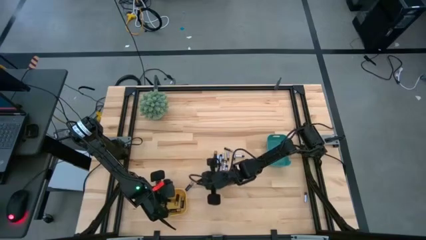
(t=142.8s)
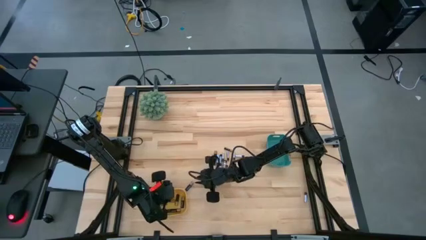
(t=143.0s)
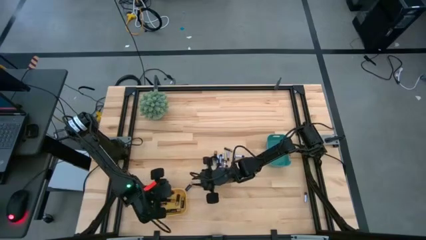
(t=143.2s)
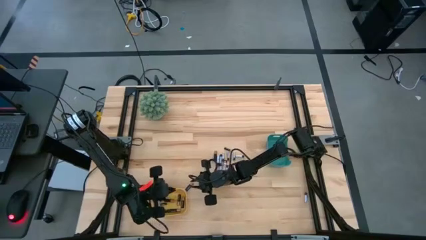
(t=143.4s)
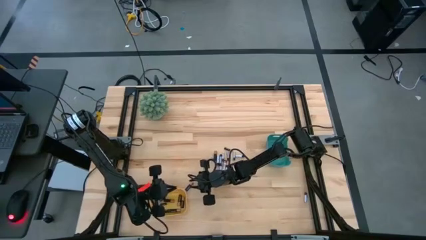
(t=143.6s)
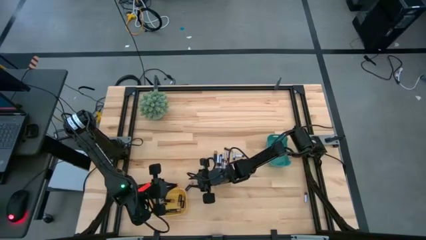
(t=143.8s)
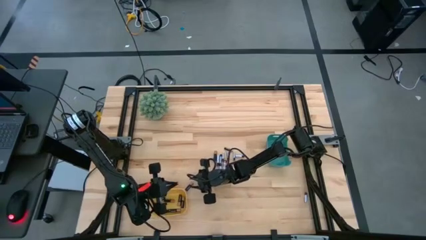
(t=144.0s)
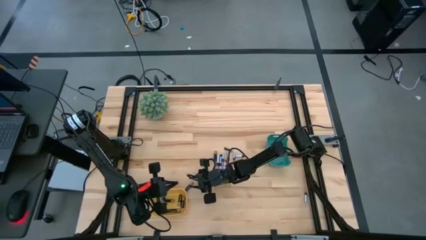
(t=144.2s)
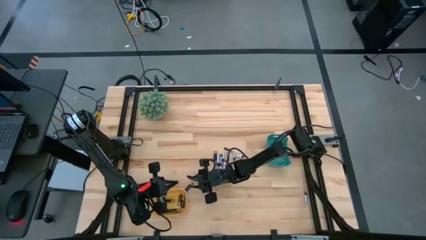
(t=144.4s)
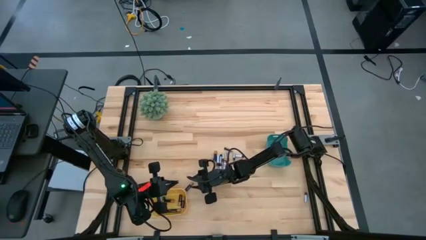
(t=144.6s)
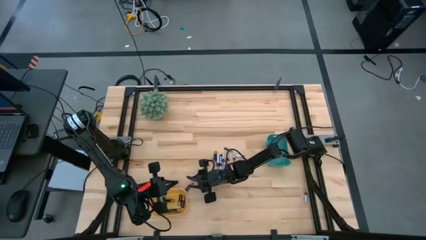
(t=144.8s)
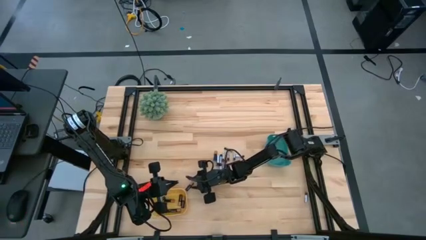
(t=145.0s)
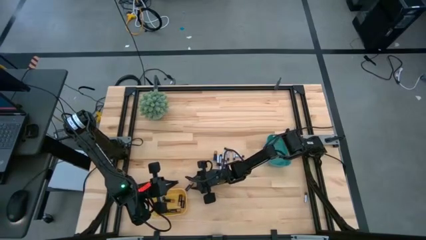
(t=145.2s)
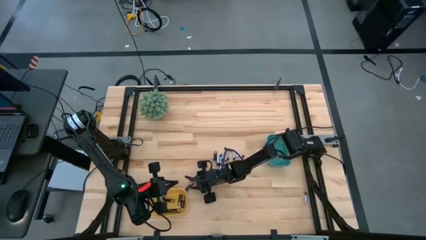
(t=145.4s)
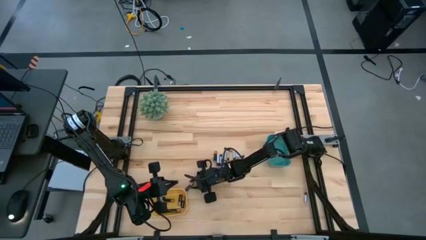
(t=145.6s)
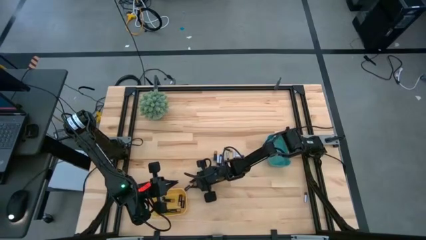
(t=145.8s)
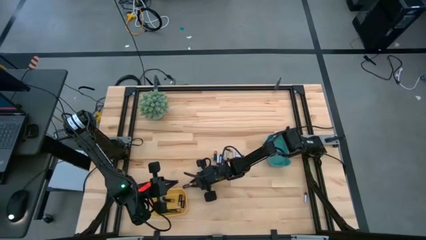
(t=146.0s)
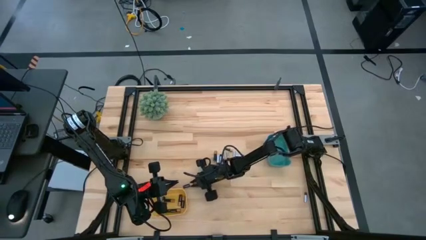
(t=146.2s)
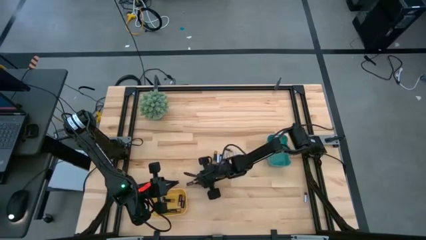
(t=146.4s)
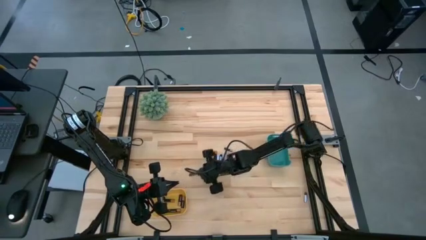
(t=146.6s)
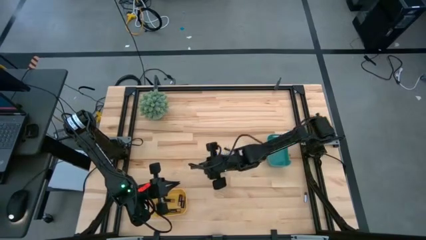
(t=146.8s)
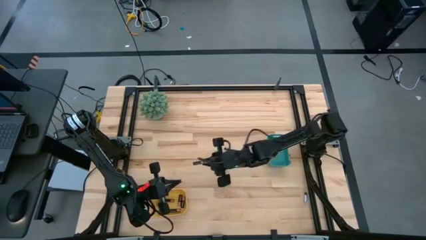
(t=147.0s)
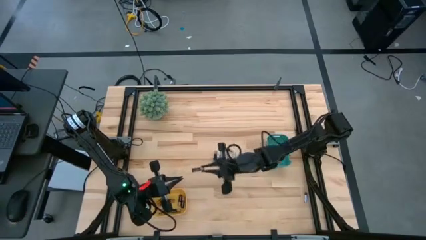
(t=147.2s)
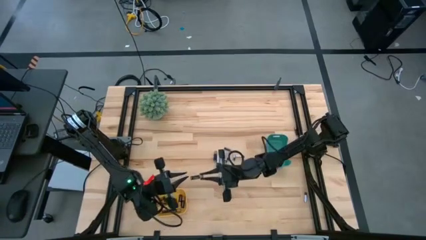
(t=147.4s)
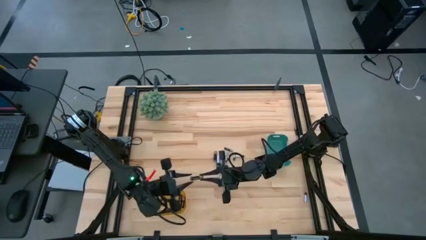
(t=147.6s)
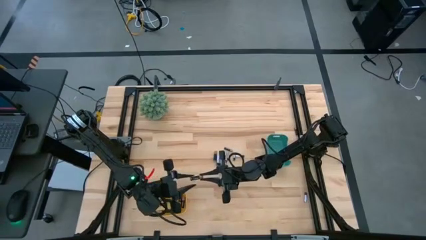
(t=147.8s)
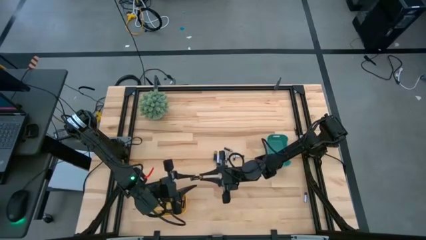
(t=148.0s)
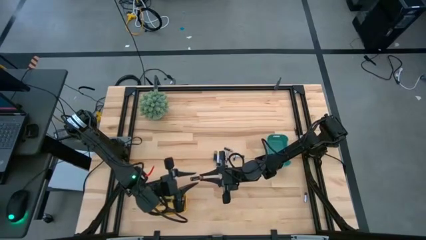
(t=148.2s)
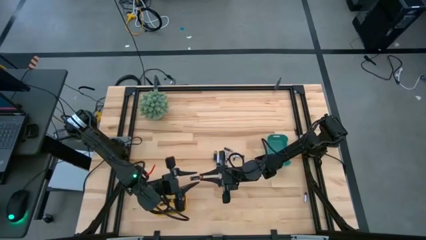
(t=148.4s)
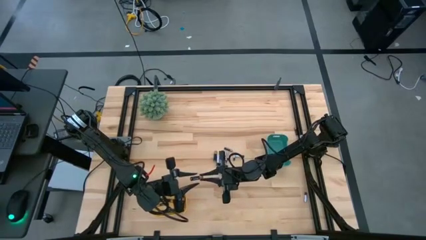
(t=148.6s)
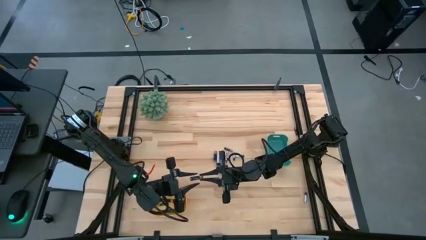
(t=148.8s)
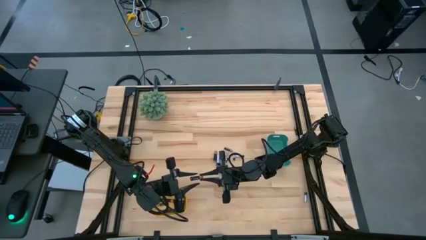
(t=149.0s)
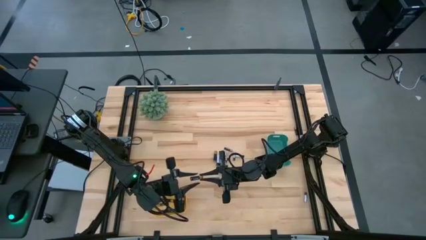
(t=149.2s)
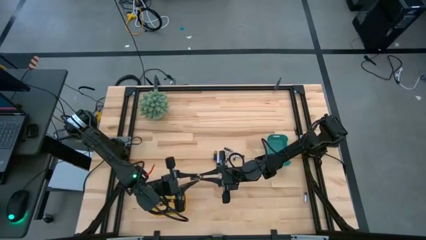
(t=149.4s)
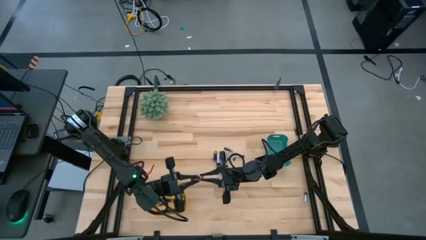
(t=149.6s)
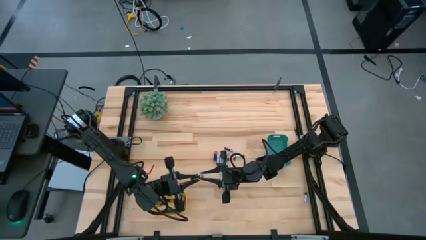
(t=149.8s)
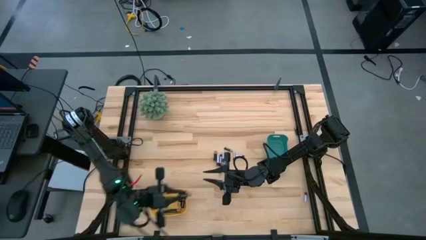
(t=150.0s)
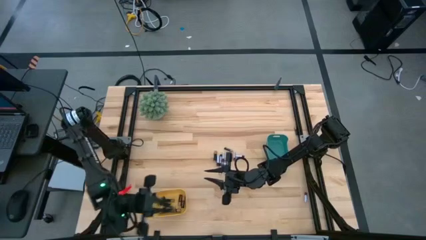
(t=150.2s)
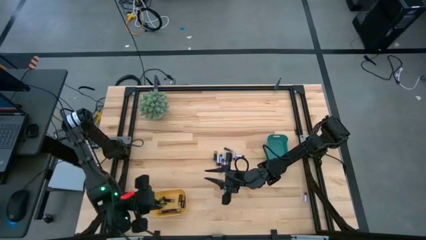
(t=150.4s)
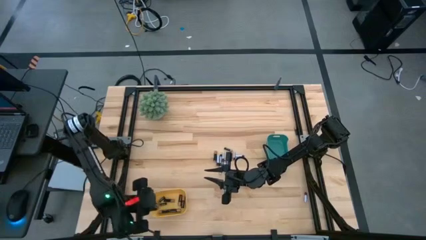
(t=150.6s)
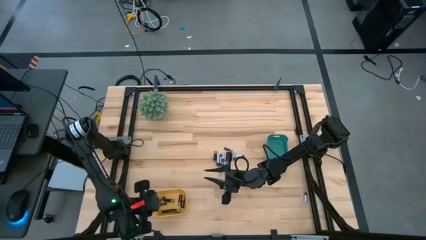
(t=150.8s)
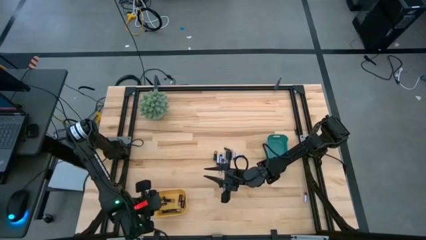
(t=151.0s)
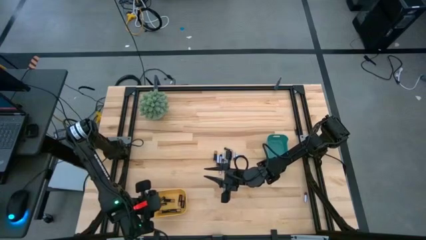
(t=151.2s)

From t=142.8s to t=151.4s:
Task: Sort batteries
Put the black battery into the yellow bin

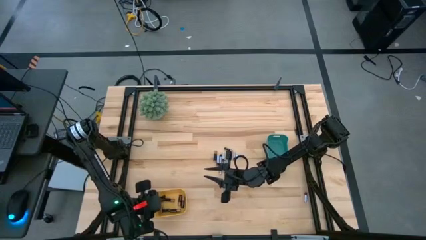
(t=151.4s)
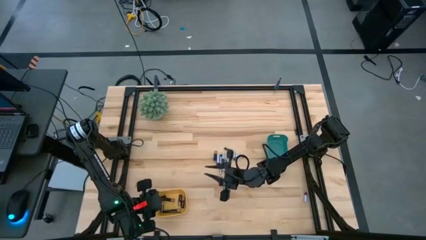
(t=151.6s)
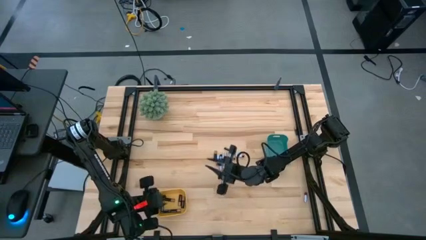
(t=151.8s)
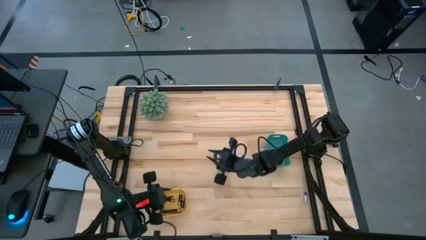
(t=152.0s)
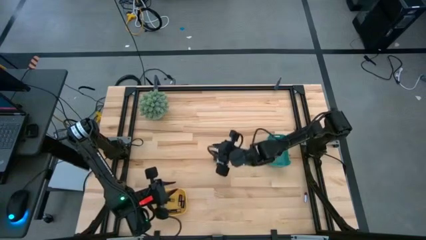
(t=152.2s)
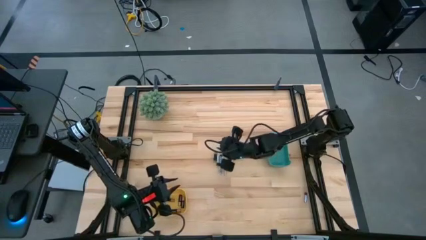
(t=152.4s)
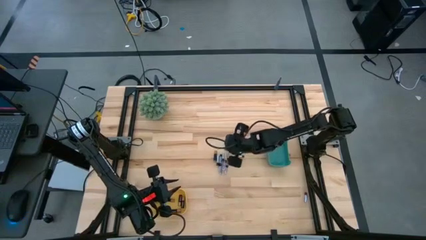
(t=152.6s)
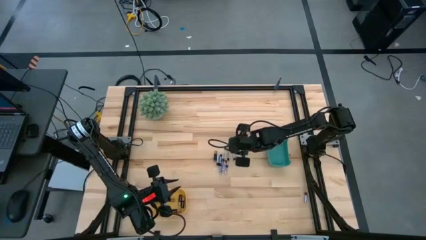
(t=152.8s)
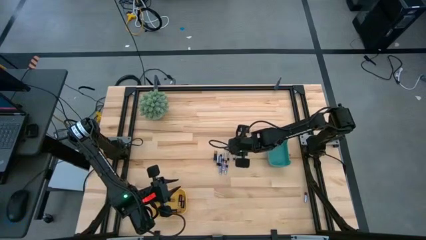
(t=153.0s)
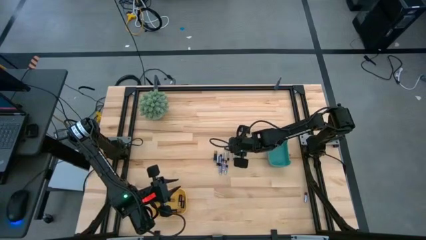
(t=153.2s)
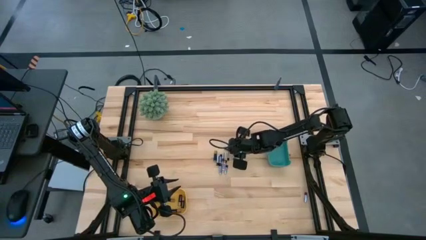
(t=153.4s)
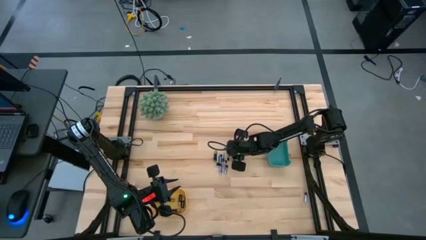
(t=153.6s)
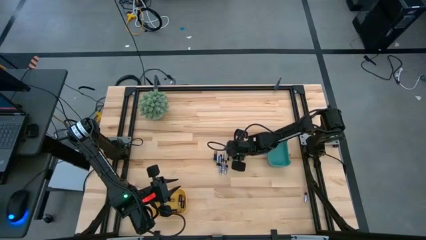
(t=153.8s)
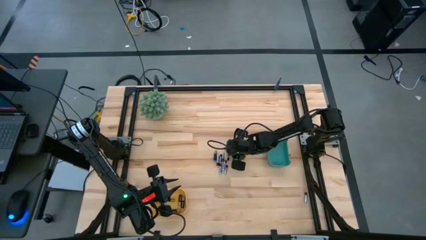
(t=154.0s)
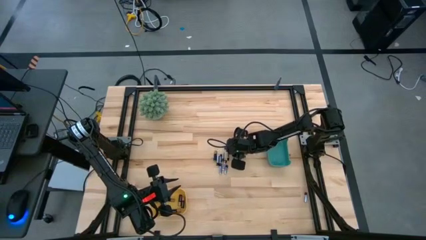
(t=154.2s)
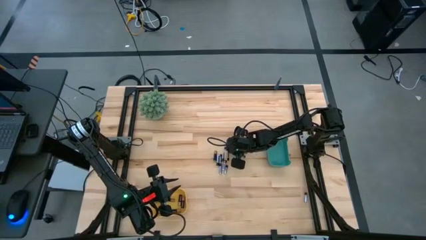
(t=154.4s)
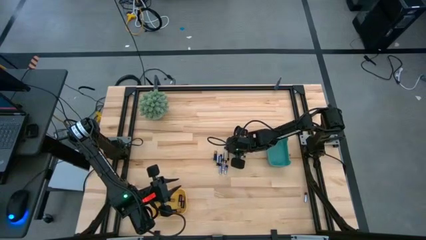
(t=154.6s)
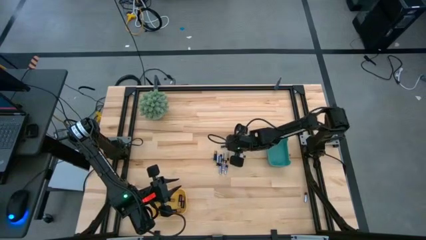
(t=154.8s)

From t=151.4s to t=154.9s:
Put the black battery into the yellow bin
